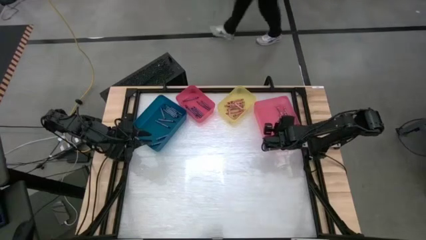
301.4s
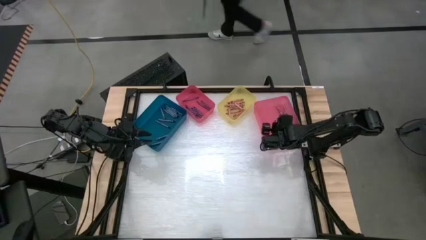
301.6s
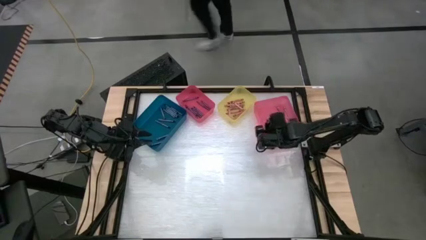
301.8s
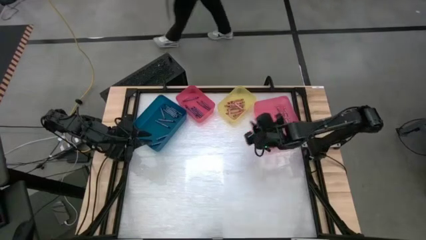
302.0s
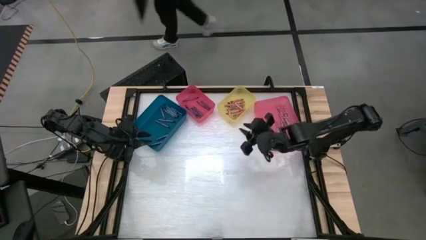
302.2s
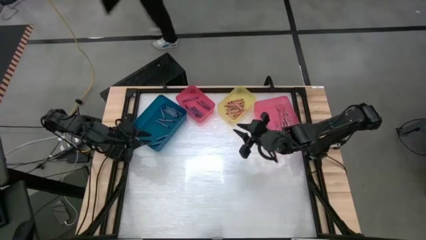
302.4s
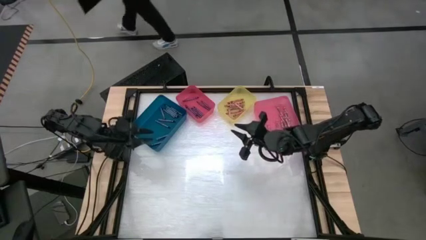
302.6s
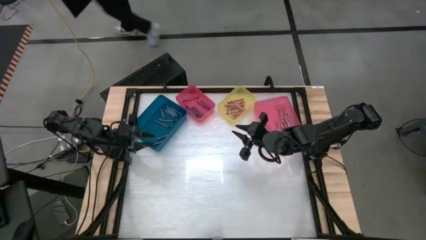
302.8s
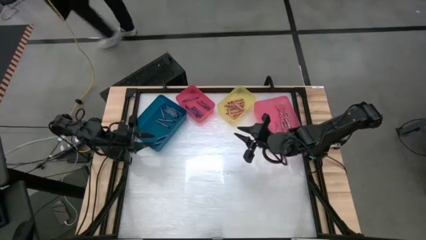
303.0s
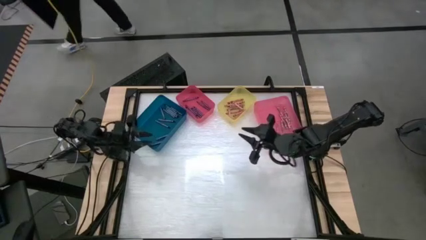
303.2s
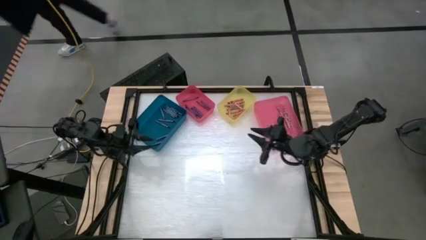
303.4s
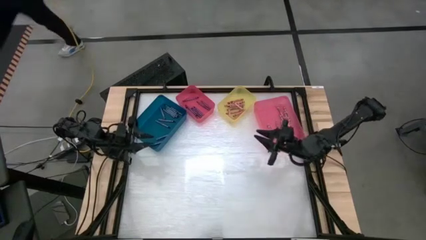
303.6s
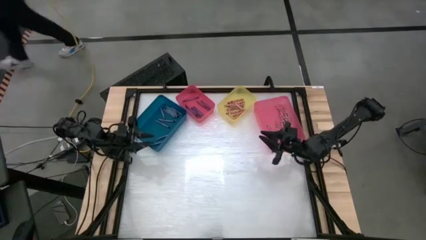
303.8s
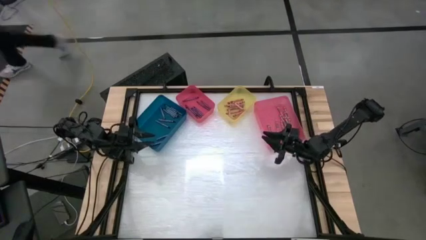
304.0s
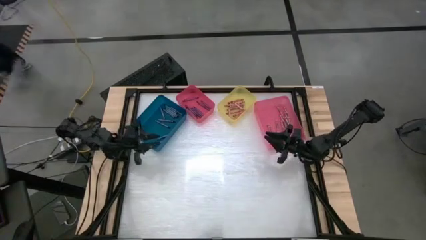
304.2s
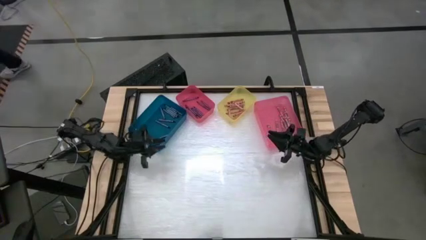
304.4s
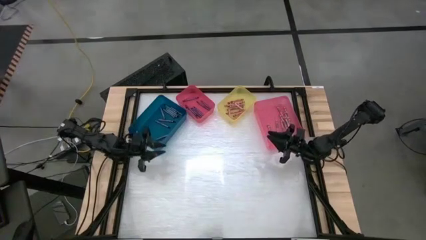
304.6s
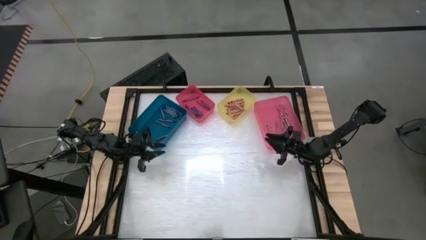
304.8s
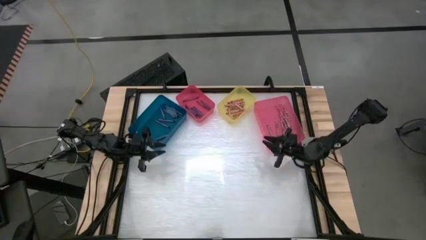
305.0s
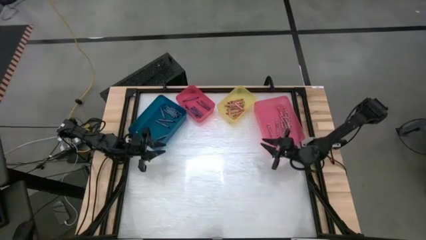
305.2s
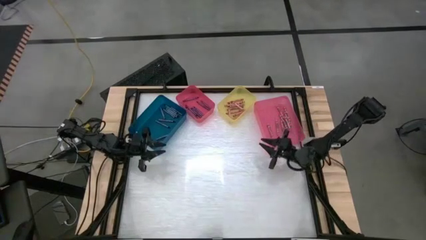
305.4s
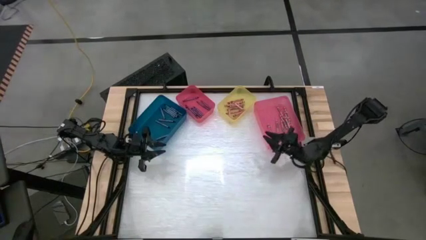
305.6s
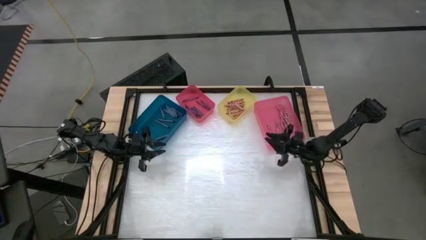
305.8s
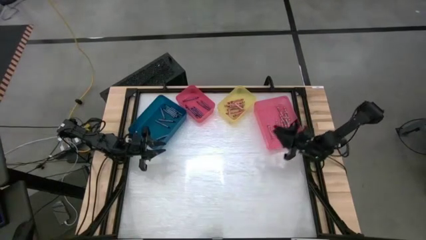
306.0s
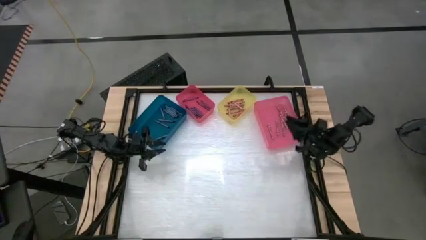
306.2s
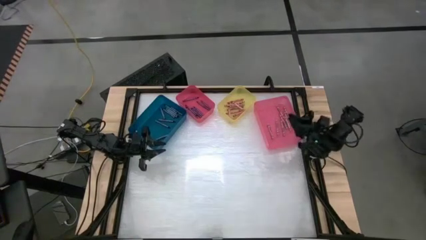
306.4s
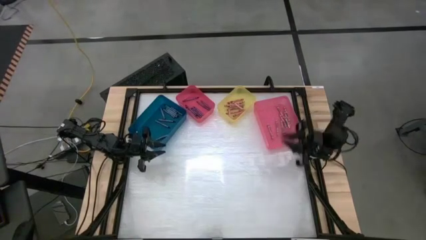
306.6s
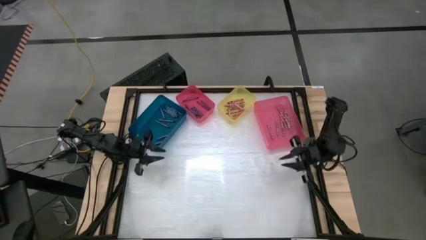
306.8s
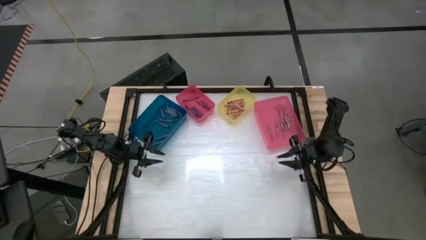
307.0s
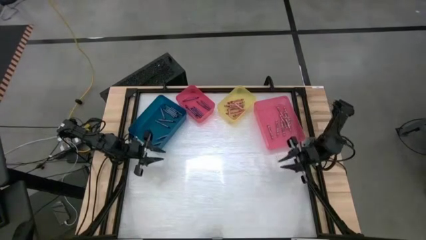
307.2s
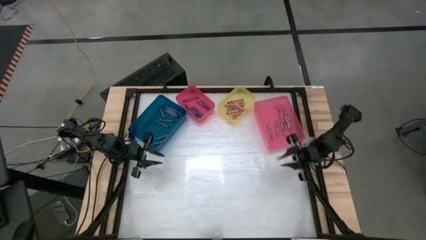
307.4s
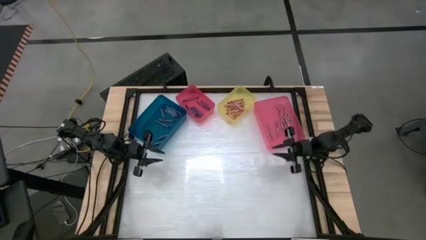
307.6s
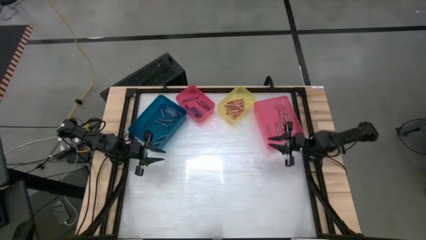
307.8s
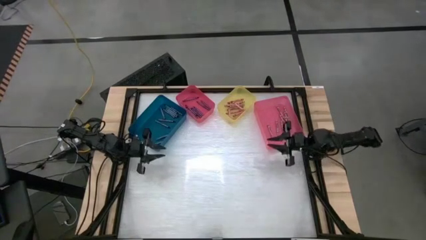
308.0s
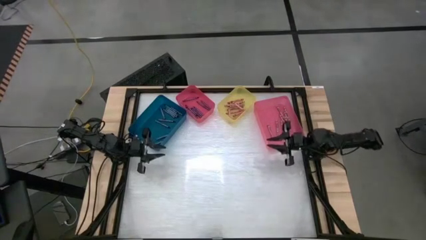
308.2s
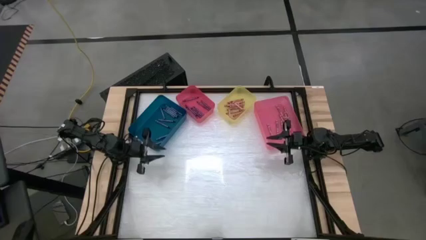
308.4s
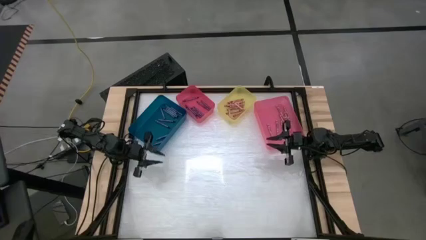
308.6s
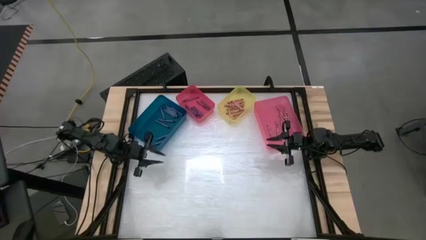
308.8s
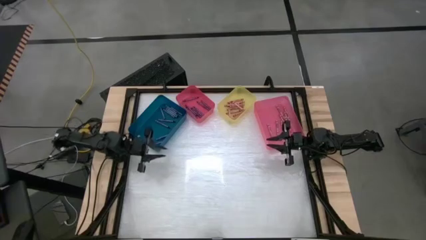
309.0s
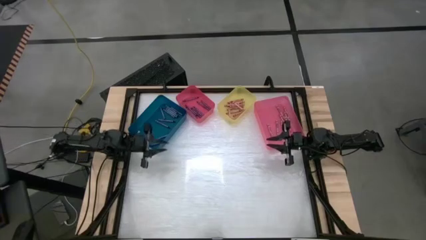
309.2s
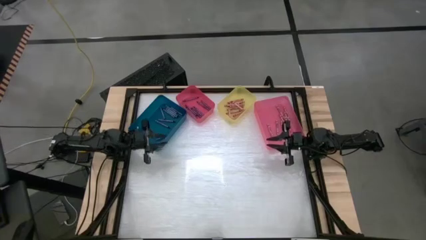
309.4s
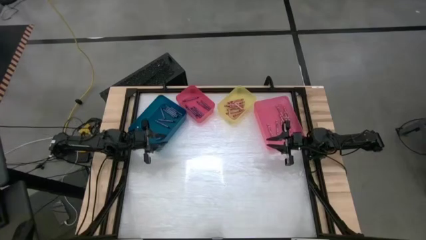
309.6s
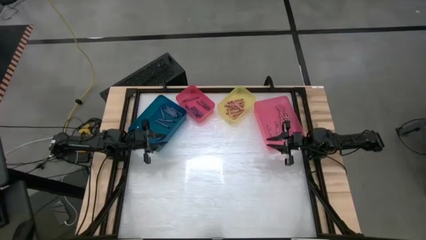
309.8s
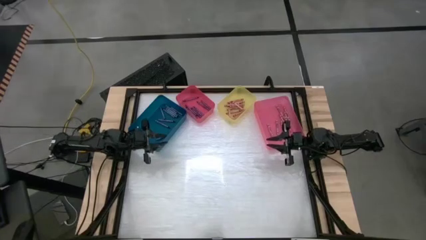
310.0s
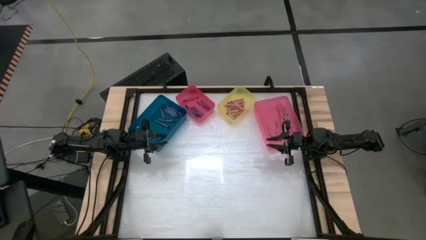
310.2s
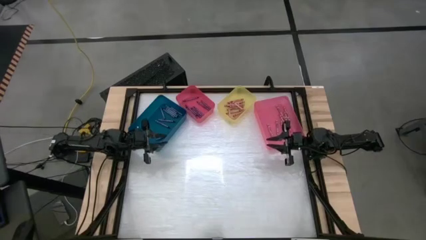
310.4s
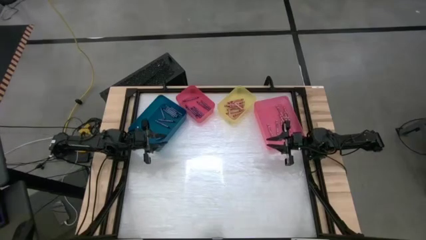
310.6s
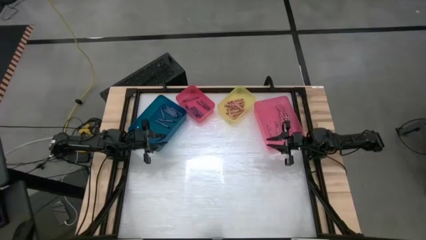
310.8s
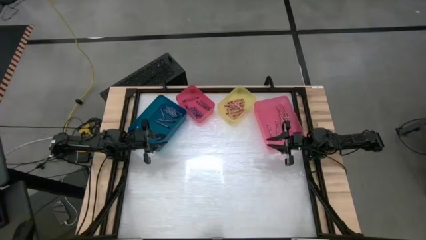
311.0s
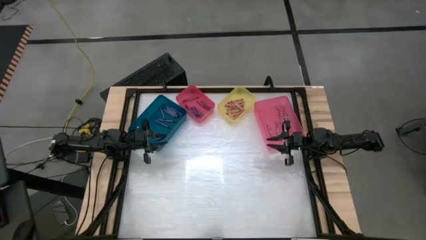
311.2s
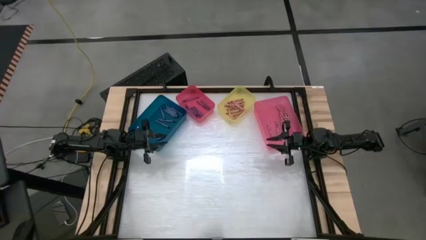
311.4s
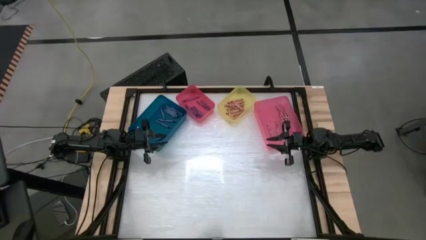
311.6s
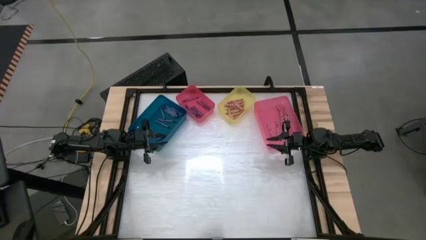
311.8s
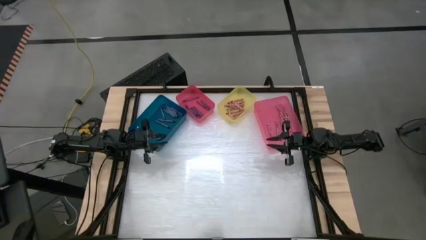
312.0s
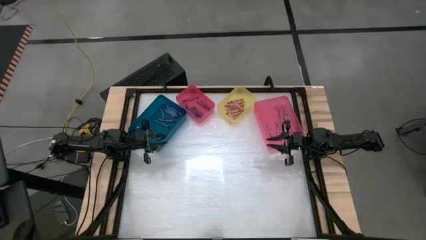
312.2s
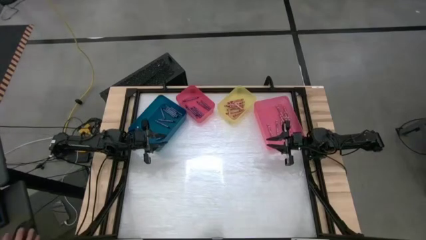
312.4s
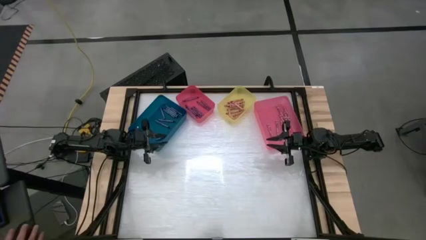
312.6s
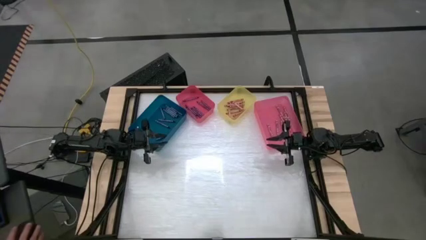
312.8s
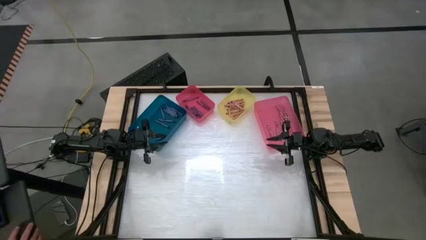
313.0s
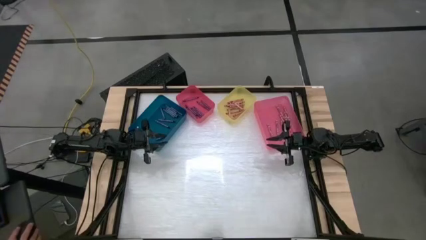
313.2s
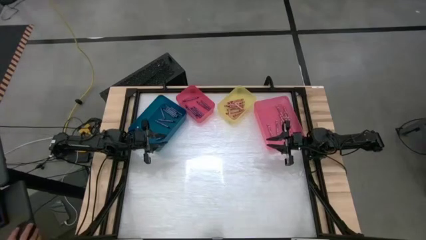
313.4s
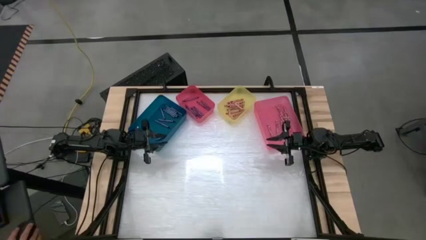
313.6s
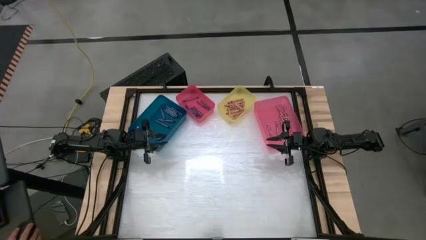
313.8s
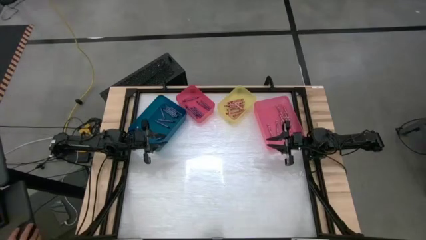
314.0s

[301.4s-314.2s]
Task: Sort crayons
Return to Home Position
